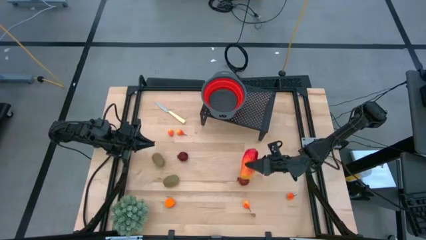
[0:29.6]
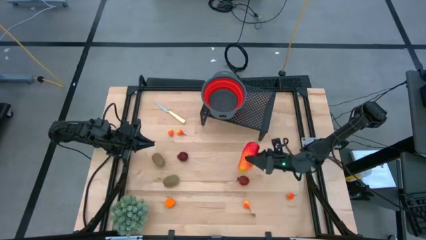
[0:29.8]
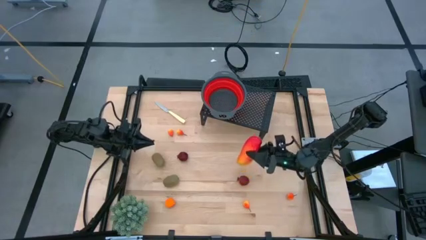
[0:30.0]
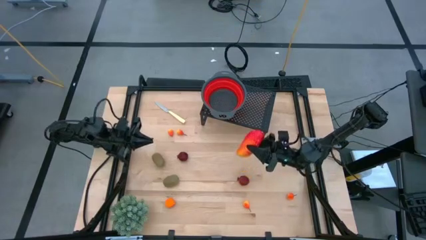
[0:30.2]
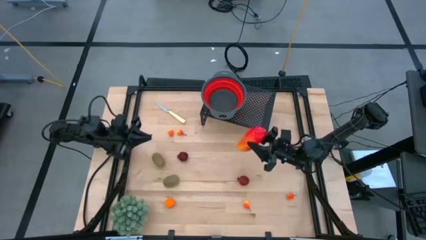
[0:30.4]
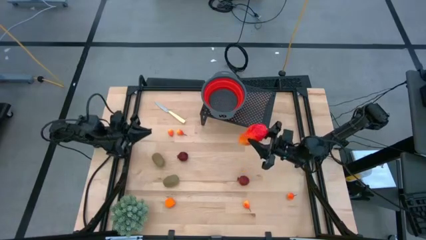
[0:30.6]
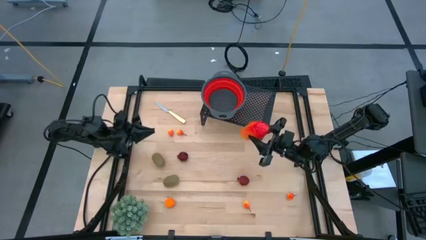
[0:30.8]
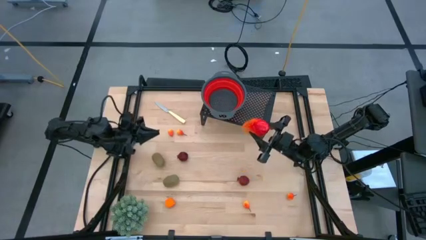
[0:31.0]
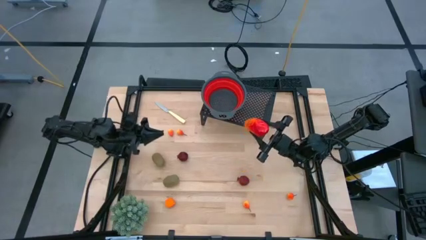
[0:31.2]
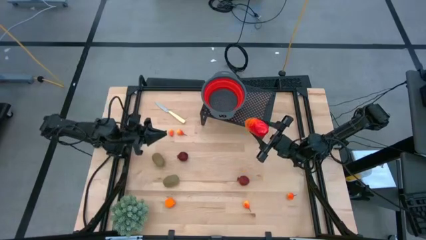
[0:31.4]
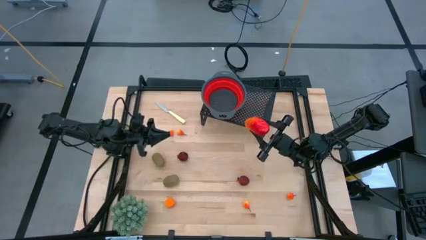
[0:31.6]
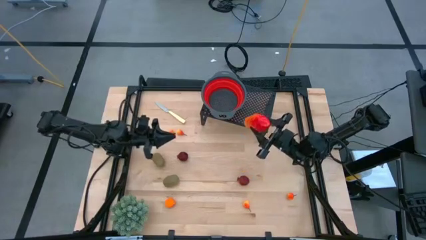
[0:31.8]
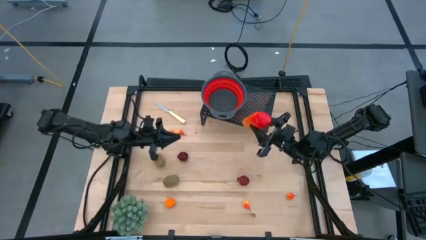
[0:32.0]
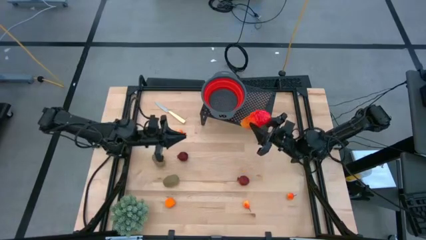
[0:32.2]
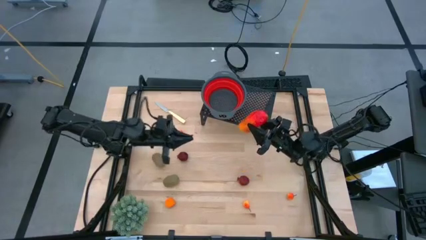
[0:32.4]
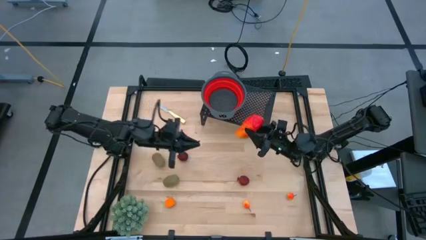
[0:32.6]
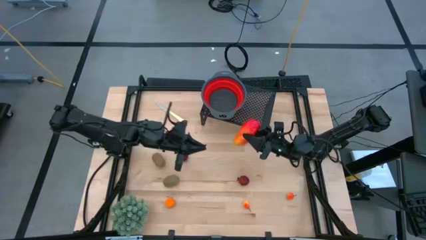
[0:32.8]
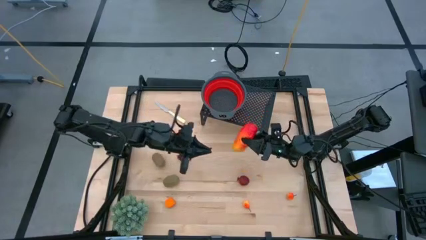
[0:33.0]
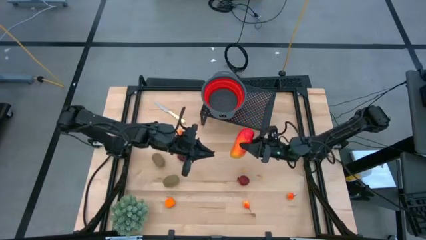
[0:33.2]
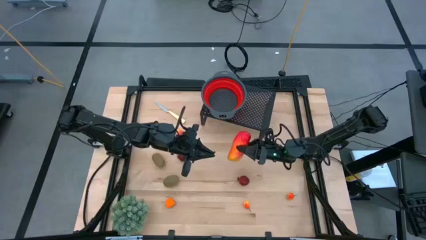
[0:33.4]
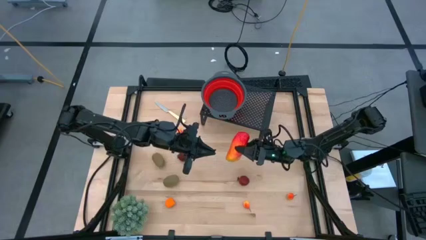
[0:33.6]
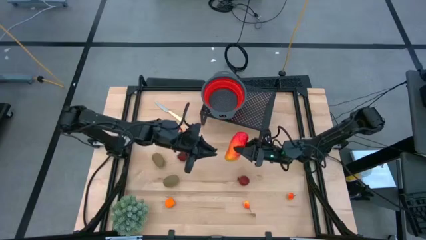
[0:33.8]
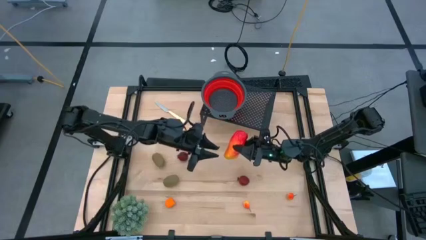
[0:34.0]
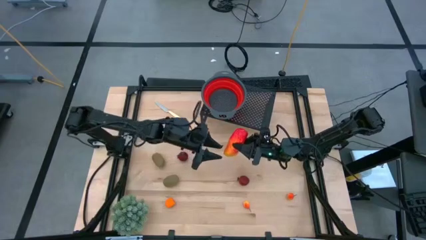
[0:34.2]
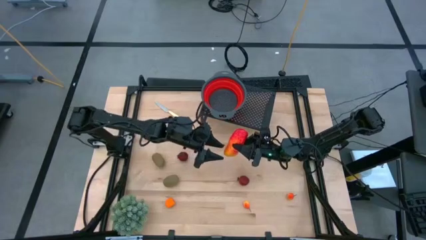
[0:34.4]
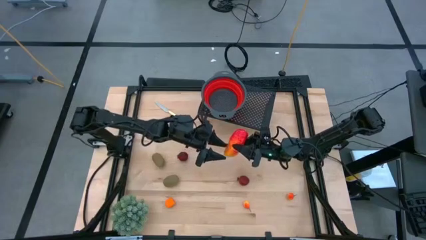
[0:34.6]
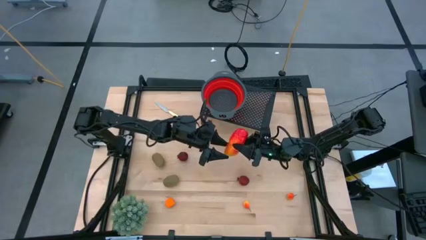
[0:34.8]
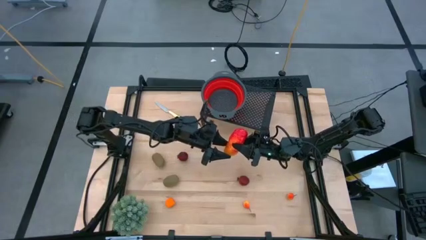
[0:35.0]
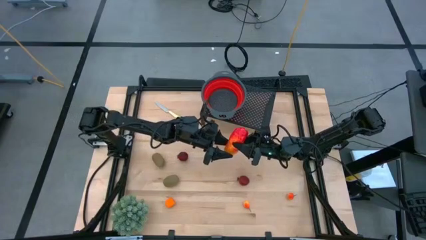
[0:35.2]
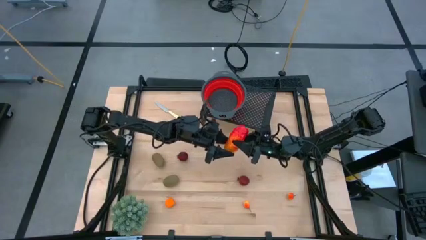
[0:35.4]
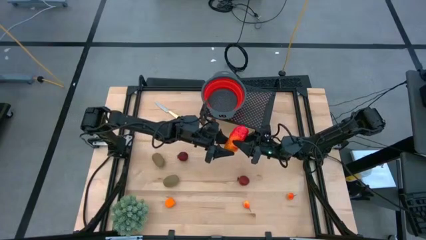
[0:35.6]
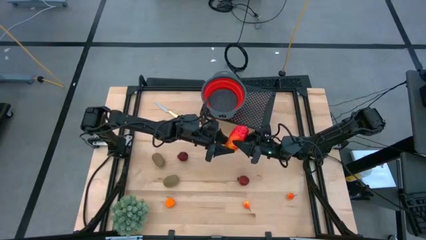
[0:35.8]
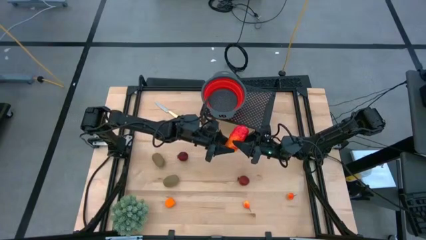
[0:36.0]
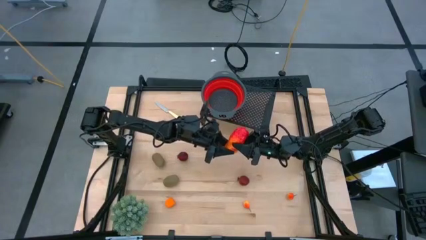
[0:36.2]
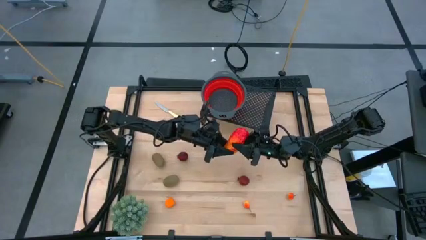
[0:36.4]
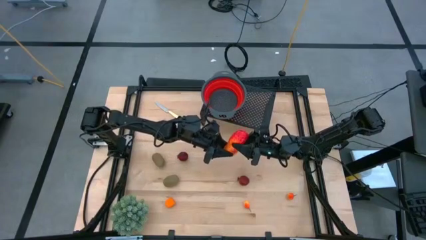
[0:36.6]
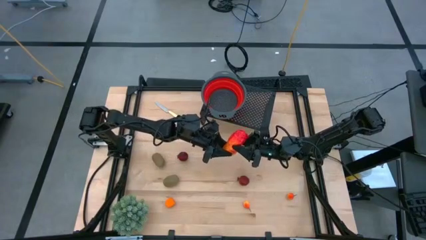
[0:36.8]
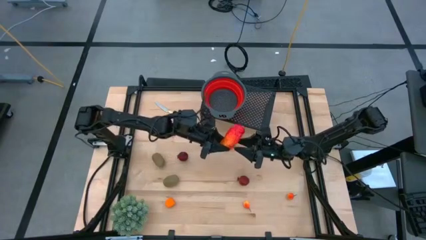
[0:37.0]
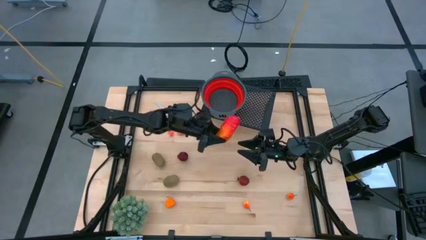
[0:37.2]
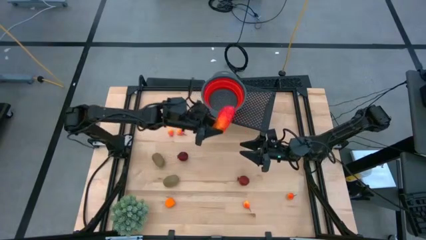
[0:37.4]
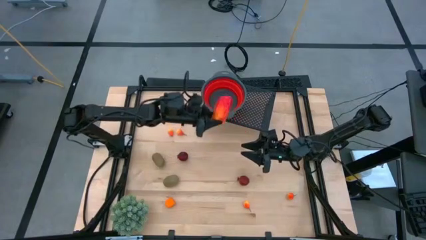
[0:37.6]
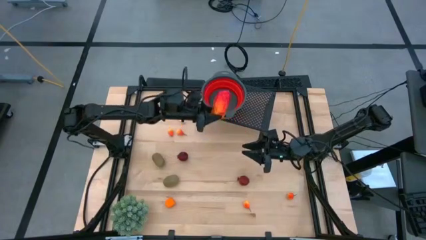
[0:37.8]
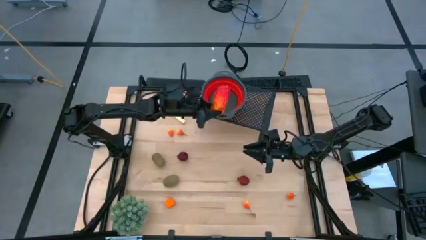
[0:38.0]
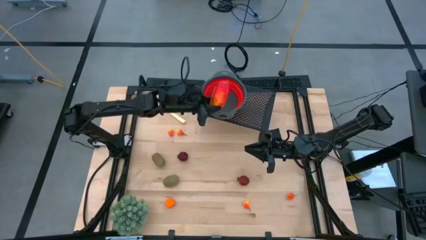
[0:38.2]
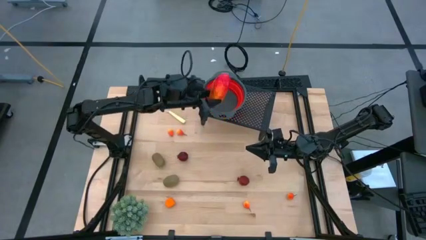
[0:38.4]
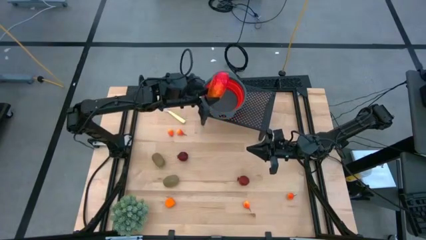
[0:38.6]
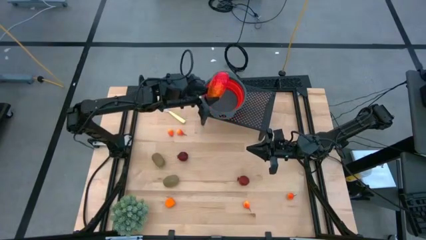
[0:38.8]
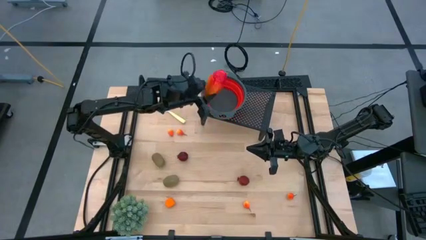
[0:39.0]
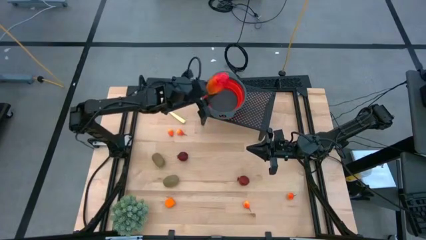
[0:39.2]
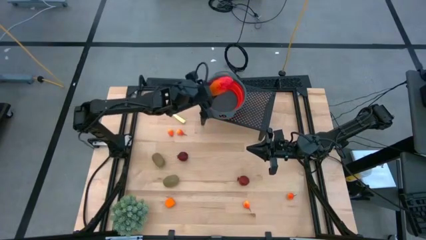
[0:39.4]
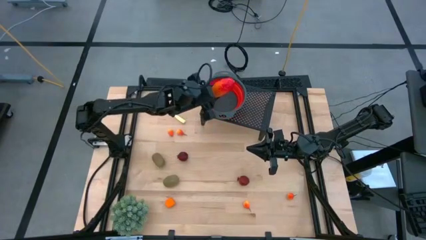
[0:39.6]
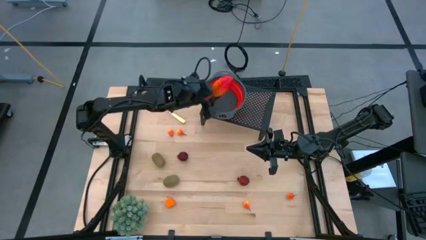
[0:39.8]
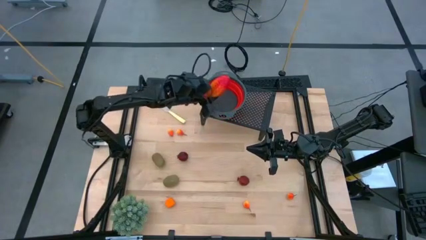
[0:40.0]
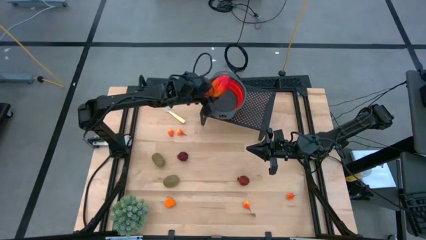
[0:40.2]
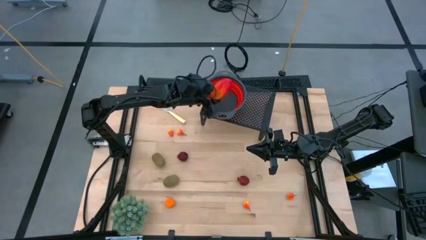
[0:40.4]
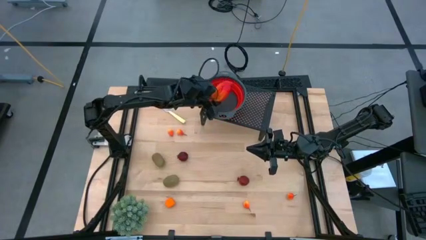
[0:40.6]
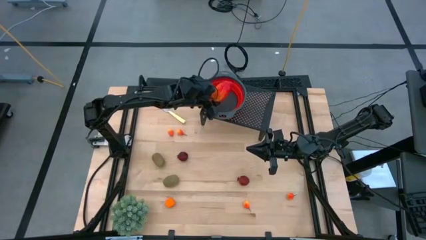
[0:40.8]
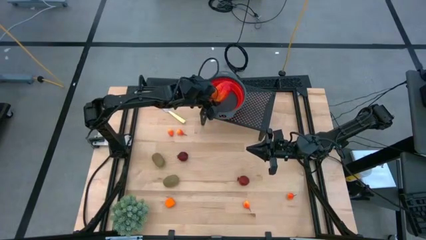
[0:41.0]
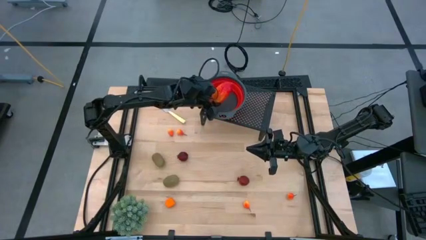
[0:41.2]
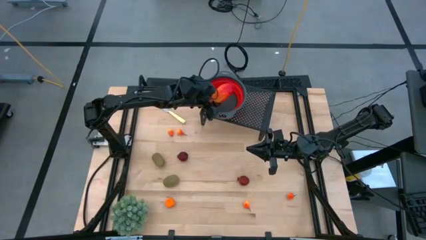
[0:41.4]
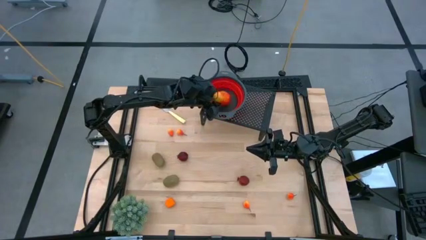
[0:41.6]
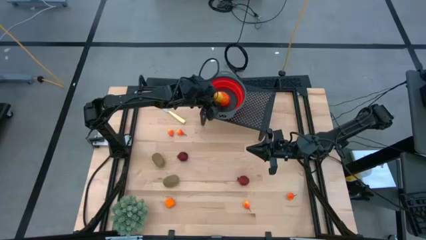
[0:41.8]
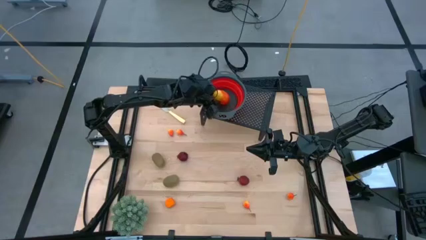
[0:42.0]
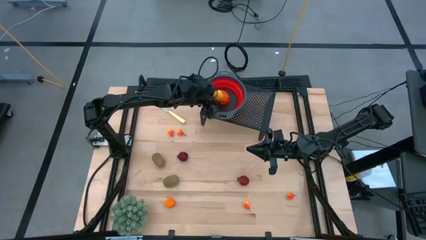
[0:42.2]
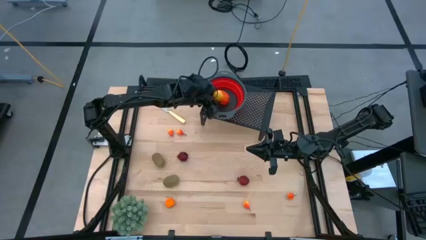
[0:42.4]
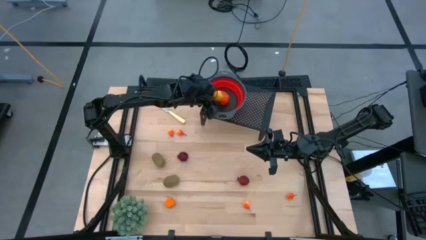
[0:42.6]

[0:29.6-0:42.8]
Task: Pick & Place Fruit
Put the mango into the strainer bowl on the shelf
